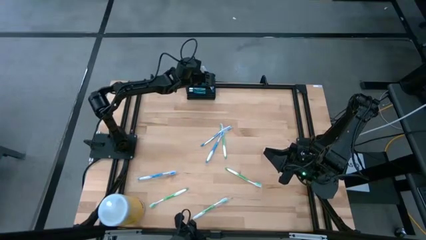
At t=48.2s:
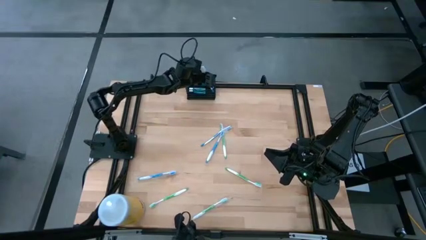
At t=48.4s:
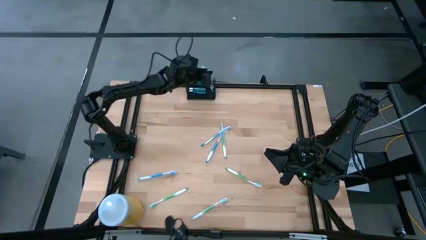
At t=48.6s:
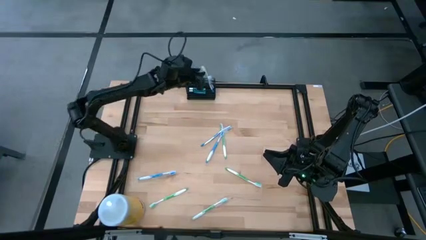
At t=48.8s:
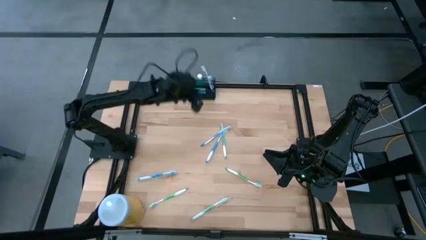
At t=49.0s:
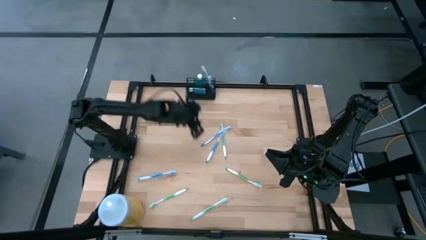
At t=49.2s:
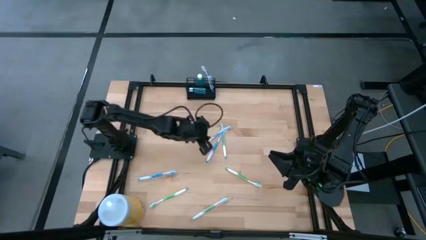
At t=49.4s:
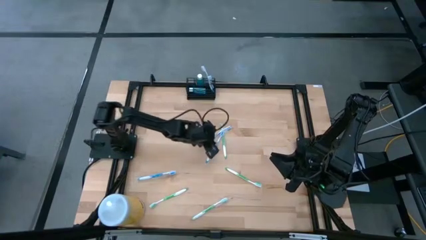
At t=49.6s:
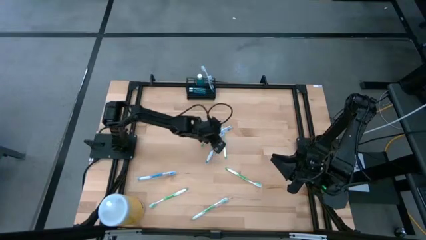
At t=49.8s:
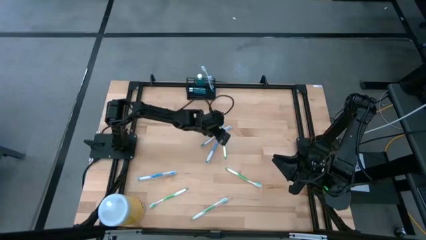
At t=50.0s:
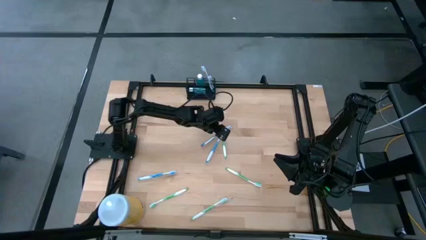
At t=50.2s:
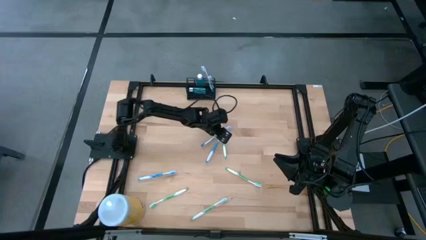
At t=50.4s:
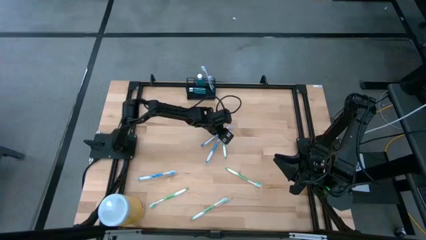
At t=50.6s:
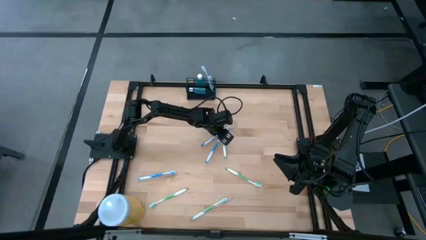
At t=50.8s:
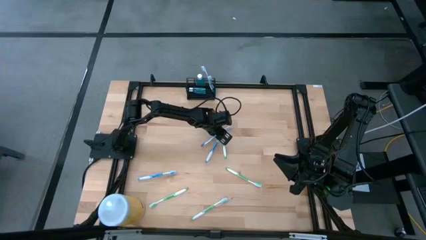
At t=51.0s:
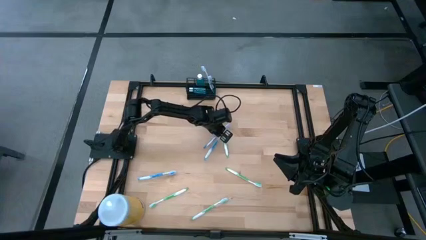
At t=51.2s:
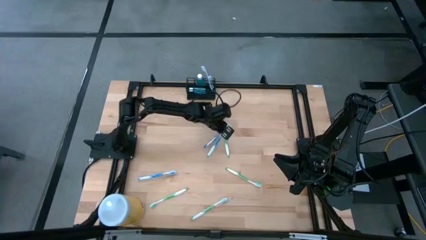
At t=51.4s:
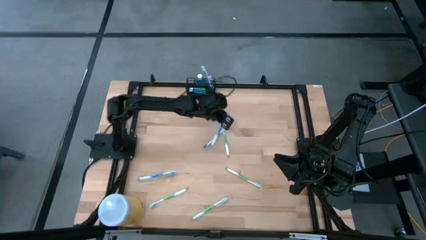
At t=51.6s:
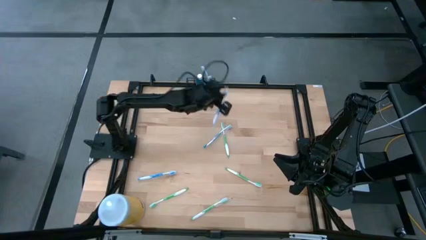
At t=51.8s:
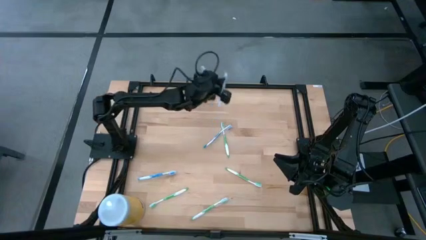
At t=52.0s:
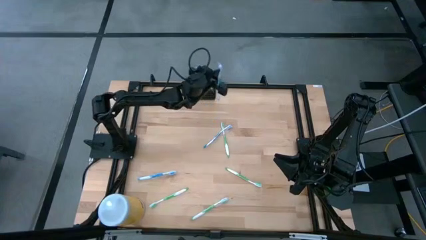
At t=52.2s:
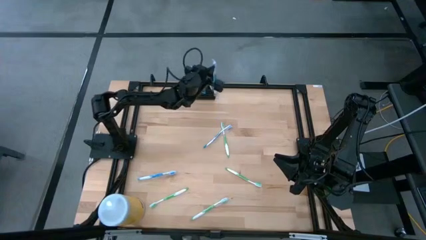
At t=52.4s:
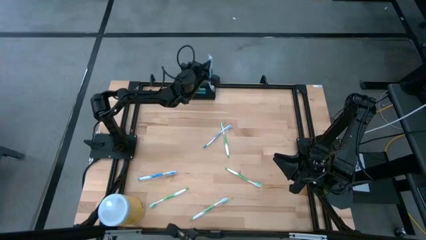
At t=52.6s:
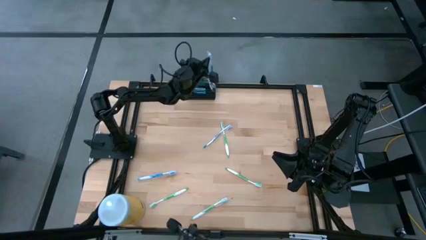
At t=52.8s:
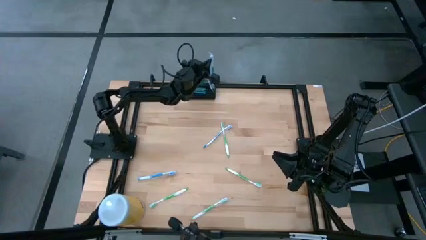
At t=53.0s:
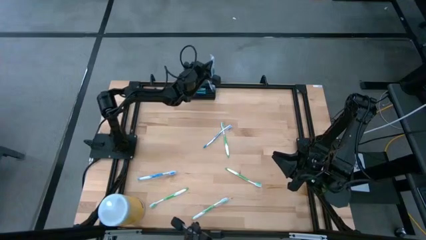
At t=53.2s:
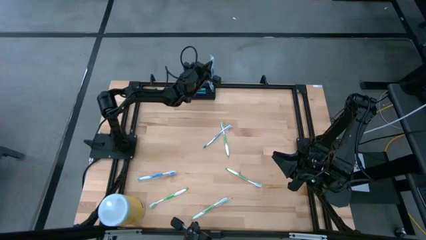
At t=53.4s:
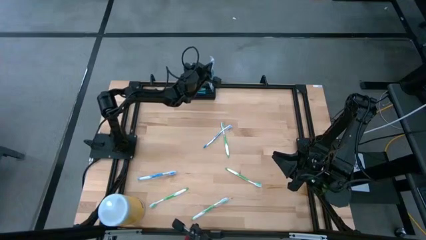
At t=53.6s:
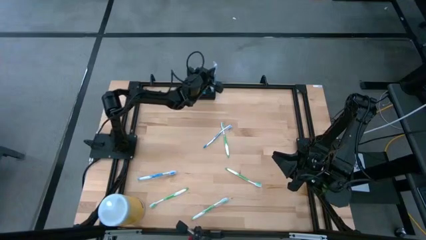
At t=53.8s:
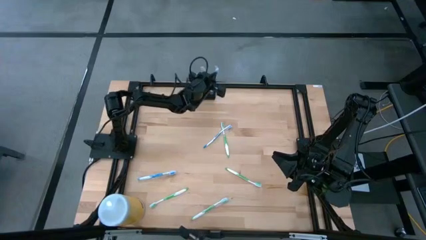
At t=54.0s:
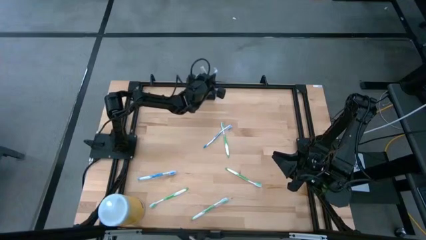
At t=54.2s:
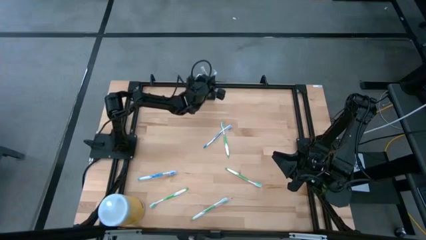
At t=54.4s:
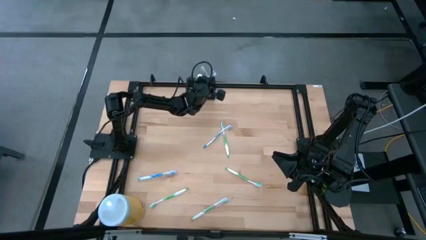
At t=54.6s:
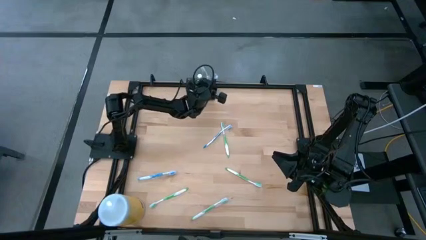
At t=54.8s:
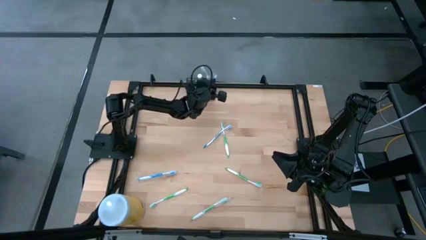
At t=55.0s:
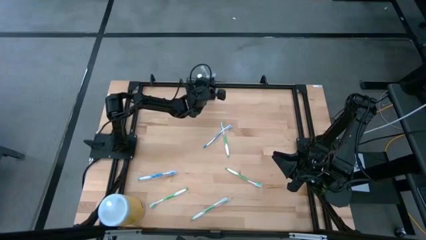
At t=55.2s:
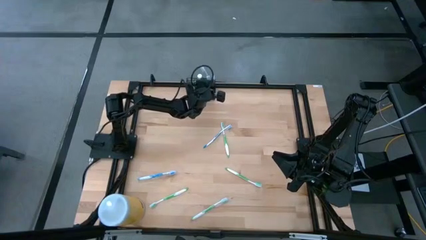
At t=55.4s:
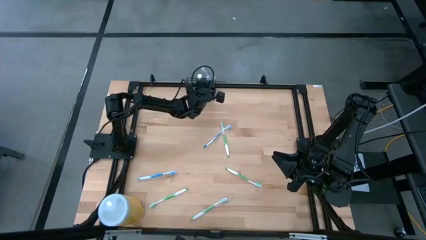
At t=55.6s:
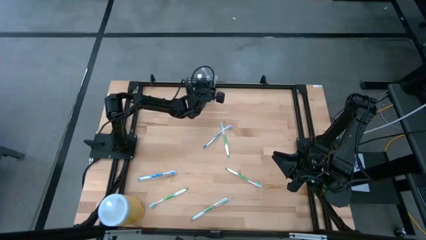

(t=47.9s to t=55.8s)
Task: Pick & Place toothbrushing station
Put the blue toothbrush into the wire organizer

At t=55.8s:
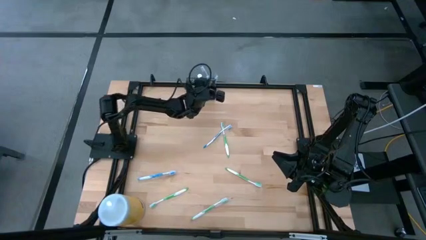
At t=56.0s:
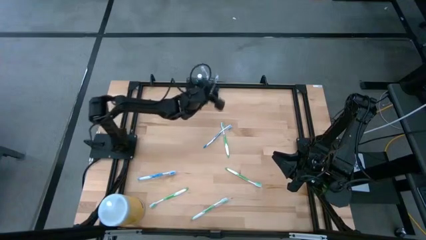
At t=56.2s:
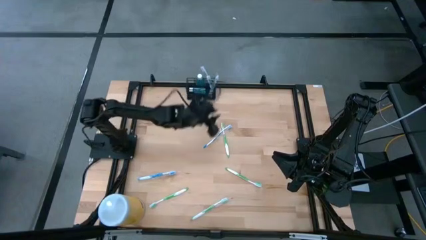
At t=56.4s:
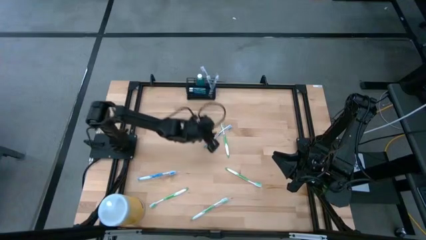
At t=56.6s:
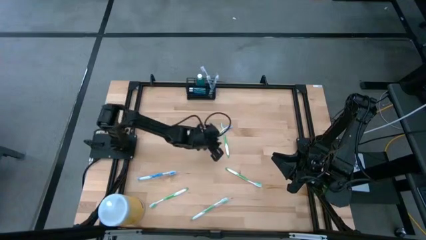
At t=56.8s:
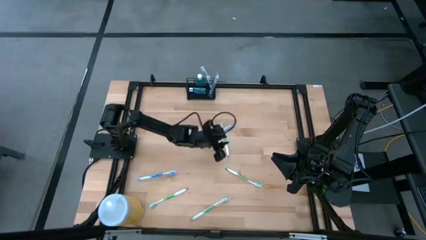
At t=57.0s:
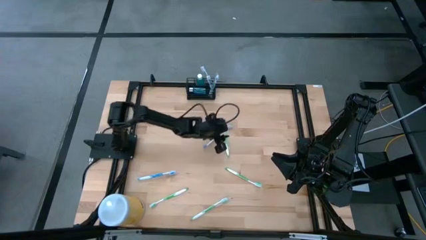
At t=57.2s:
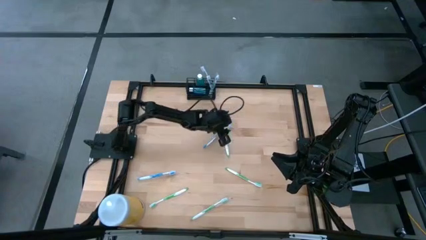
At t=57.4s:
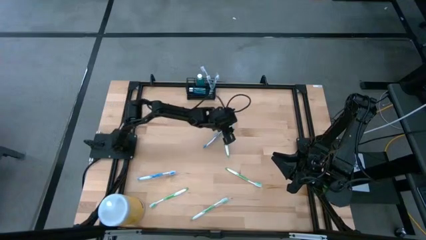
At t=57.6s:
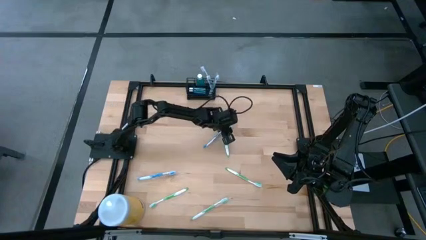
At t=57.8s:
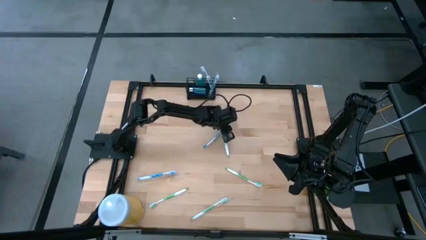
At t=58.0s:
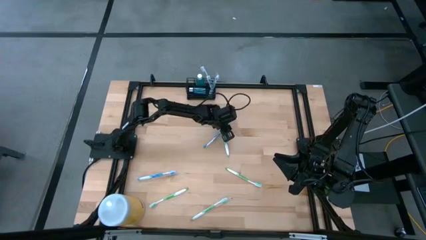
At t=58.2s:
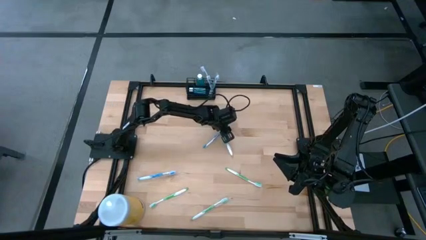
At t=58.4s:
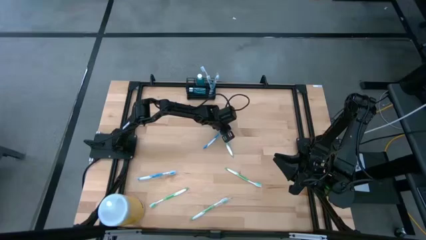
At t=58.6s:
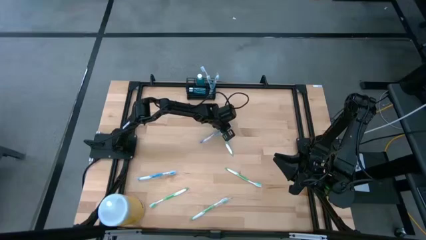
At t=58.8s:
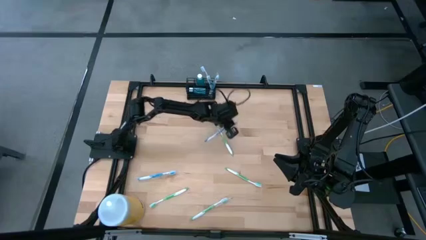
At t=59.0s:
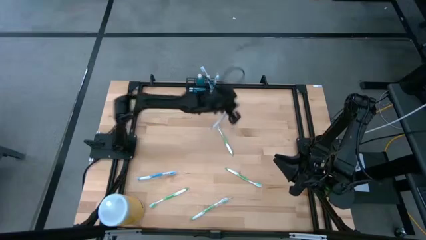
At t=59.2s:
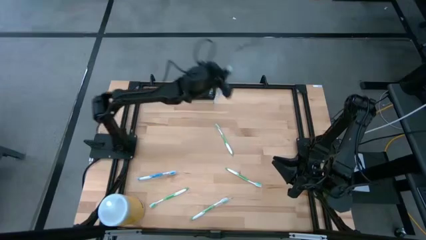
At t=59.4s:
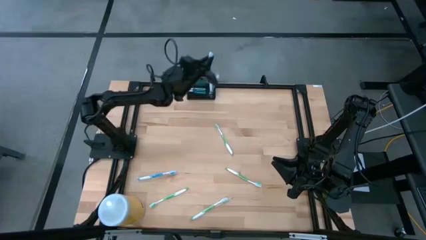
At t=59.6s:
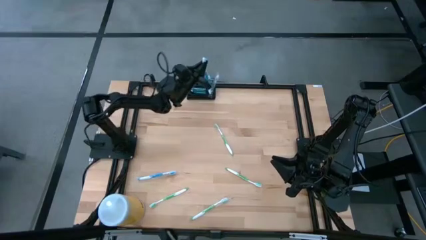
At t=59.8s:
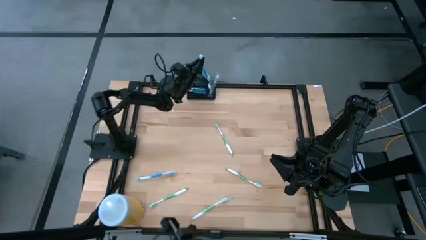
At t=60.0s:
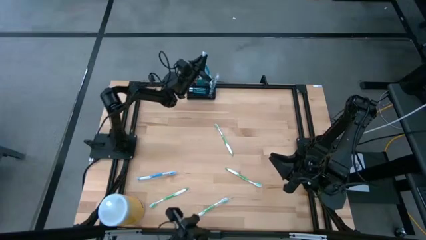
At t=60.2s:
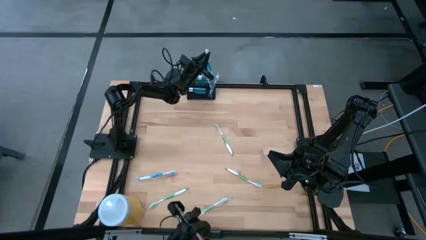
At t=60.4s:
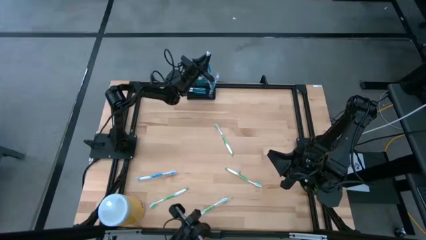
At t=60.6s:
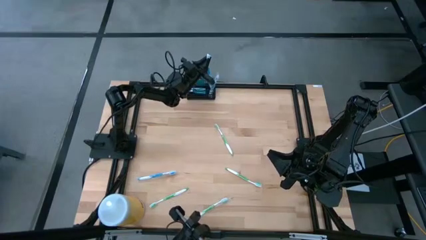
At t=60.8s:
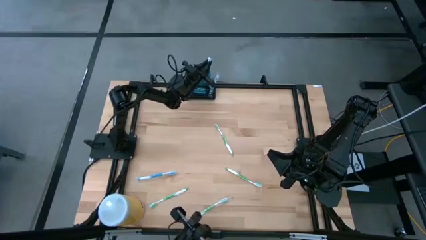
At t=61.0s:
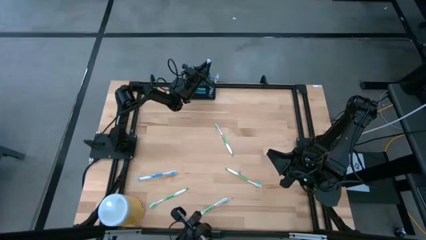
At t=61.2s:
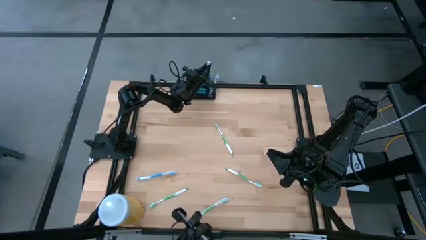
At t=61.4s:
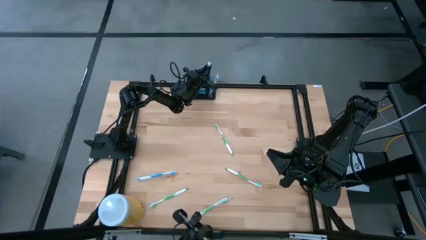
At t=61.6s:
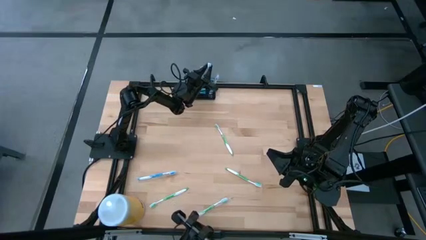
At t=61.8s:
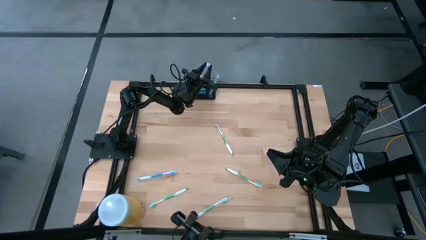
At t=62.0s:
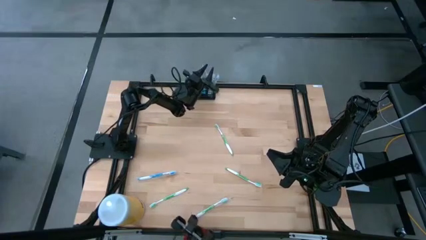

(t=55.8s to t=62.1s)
Put the blue toothbrush into the wire organizer

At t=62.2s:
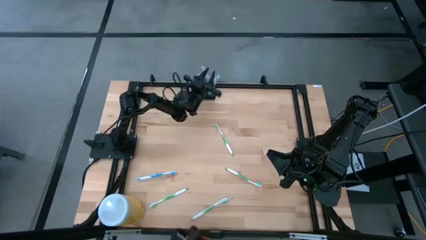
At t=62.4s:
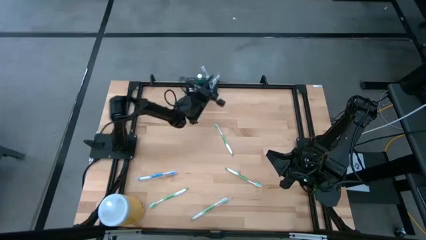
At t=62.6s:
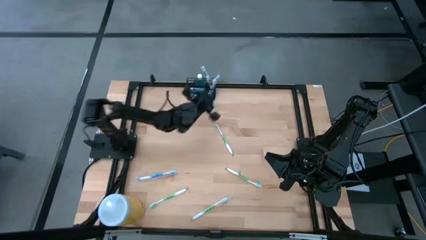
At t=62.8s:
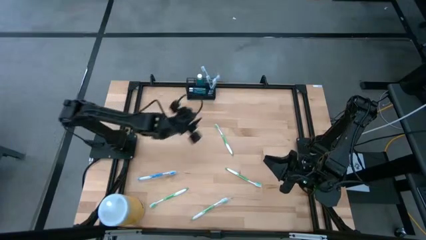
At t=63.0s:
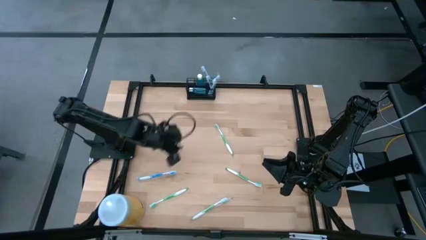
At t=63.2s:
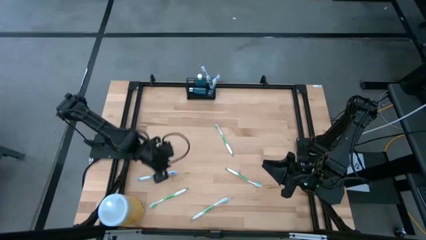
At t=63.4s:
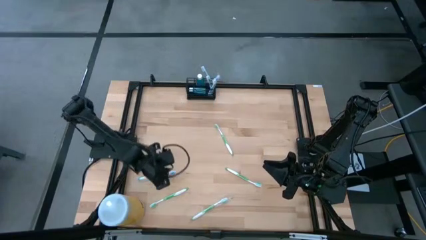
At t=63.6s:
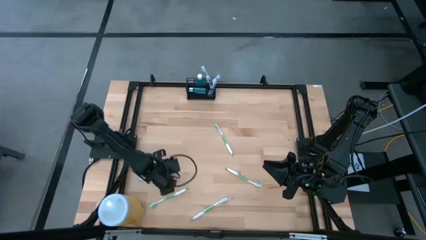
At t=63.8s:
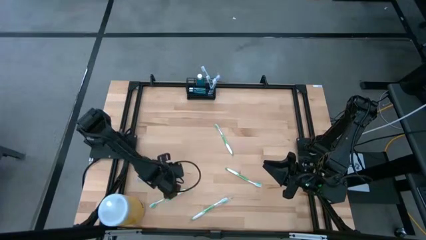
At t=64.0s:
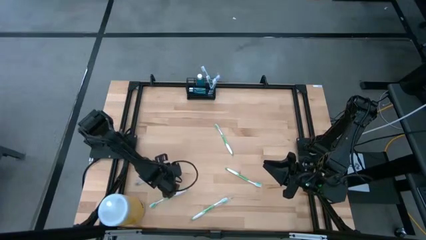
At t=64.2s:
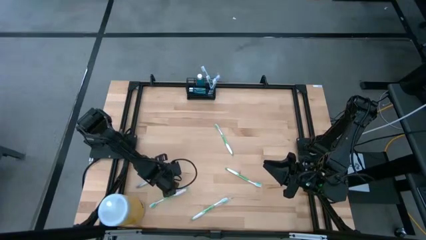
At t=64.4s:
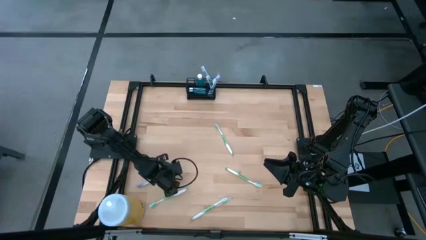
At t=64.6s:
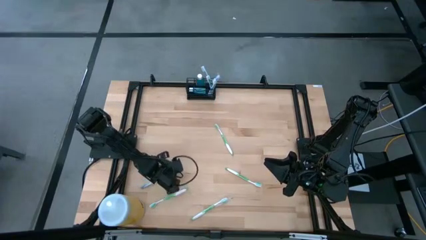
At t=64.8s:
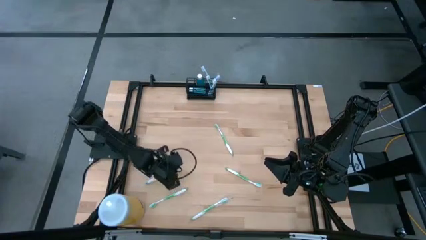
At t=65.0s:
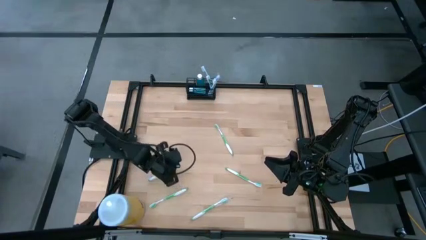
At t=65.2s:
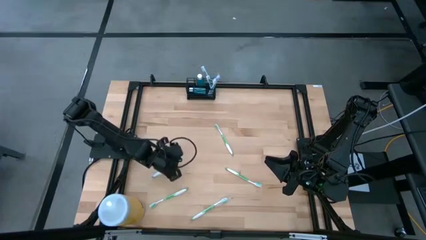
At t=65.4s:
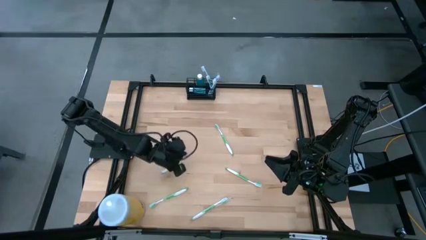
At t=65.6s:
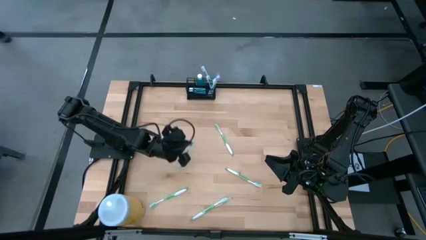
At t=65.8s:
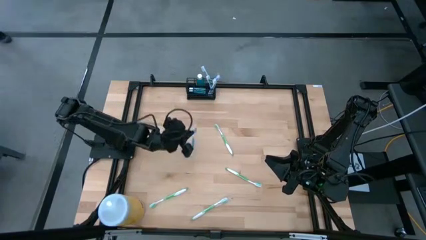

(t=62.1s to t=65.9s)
Put the blue toothbrush into the wire organizer
